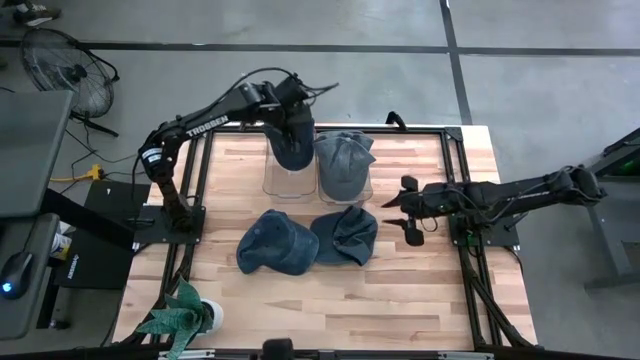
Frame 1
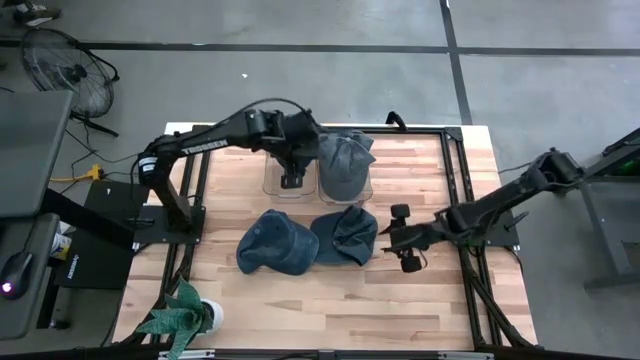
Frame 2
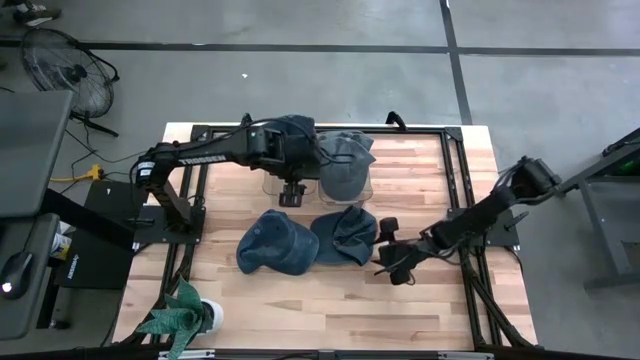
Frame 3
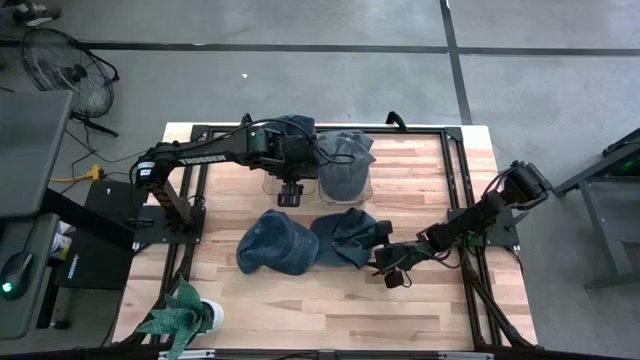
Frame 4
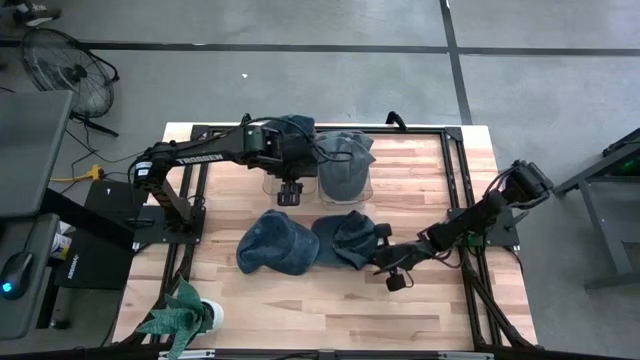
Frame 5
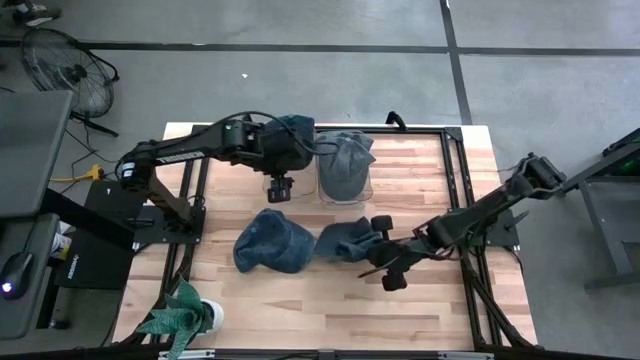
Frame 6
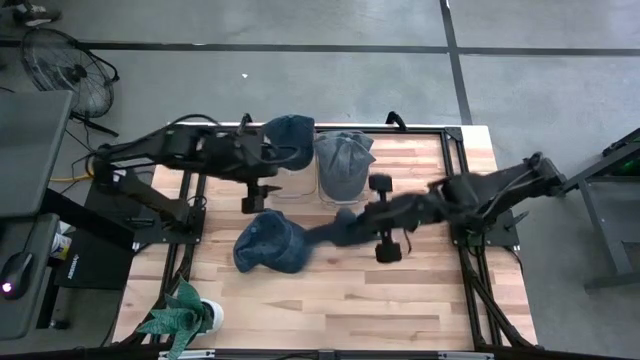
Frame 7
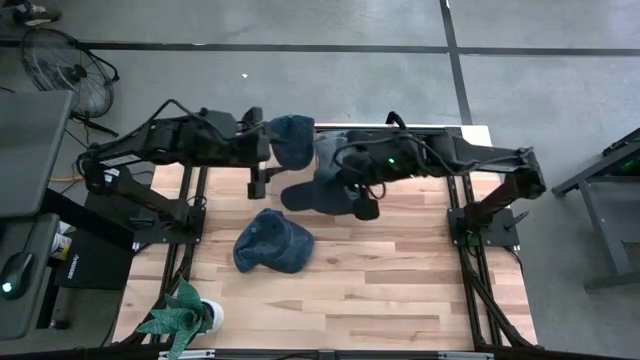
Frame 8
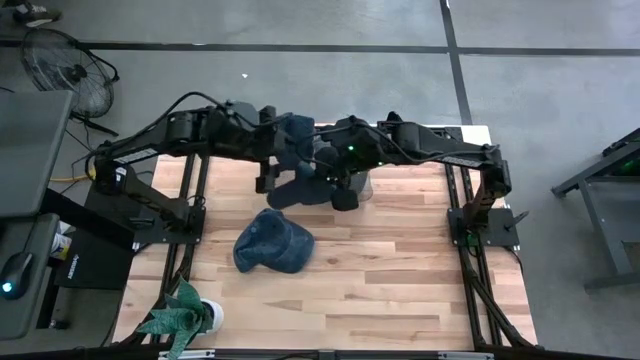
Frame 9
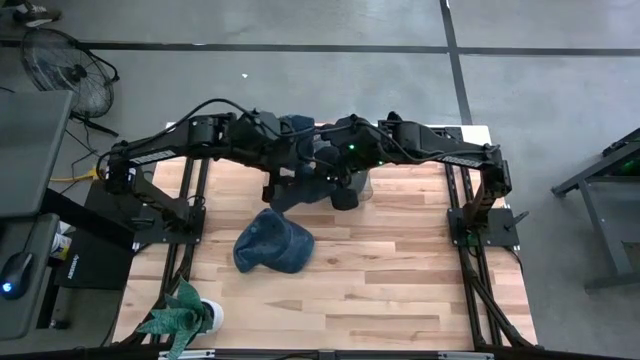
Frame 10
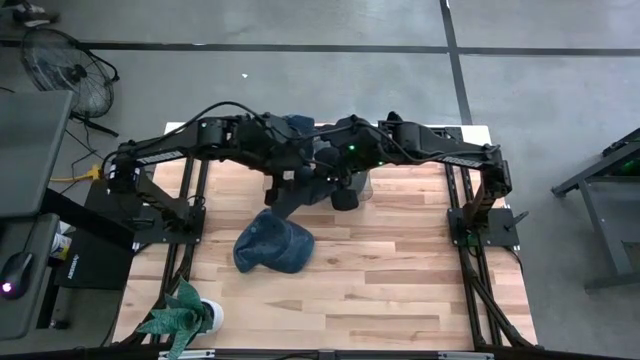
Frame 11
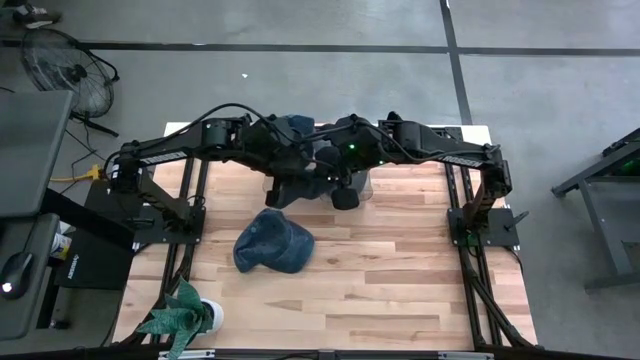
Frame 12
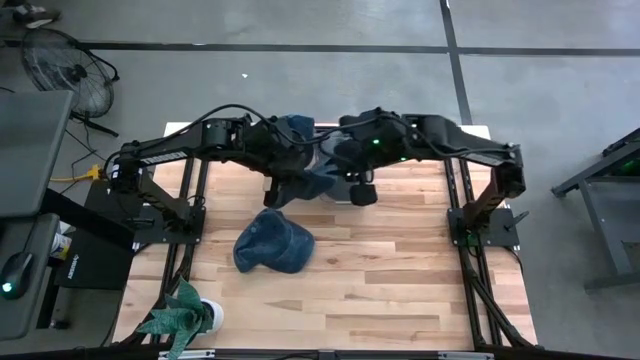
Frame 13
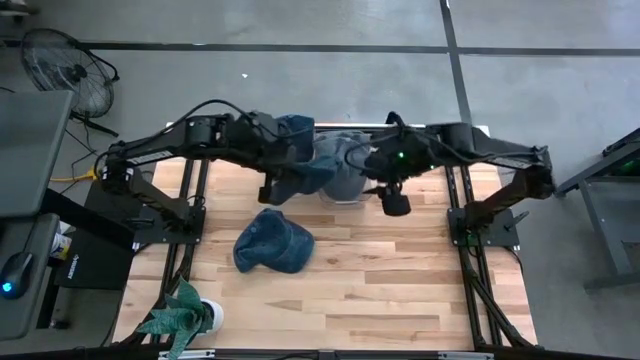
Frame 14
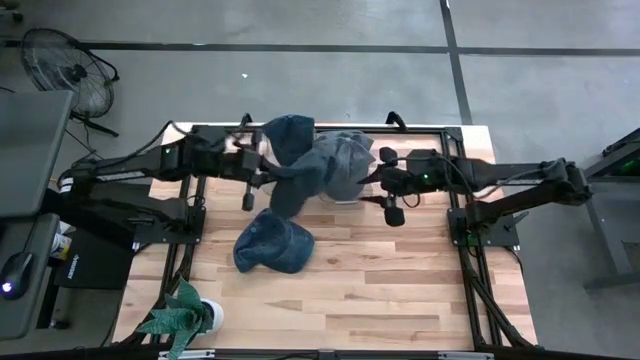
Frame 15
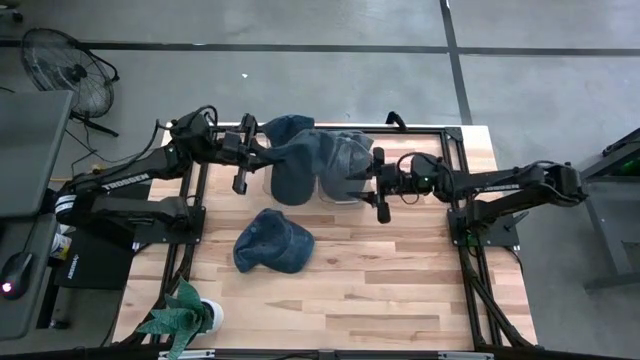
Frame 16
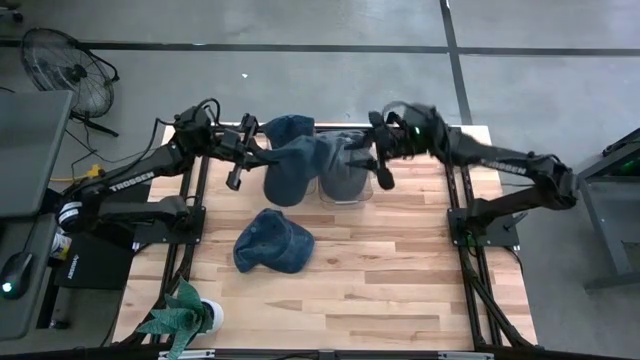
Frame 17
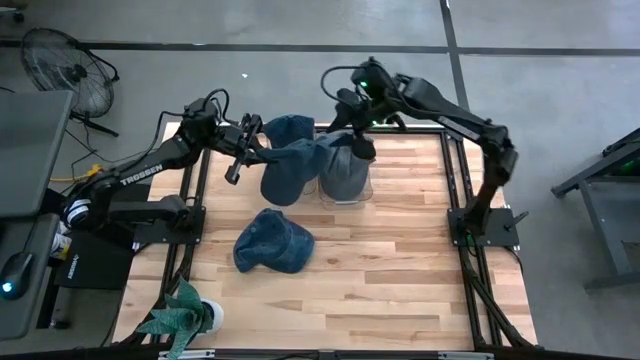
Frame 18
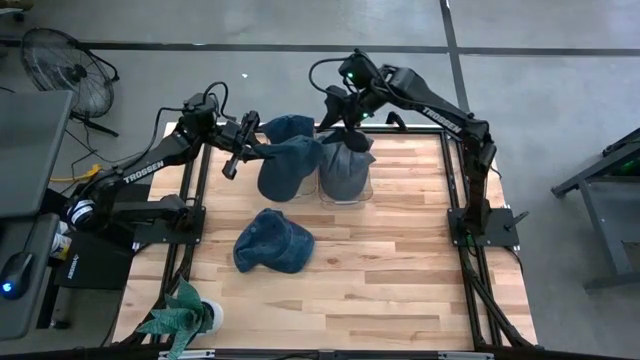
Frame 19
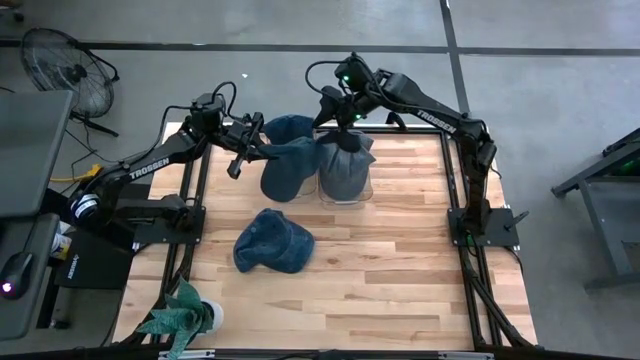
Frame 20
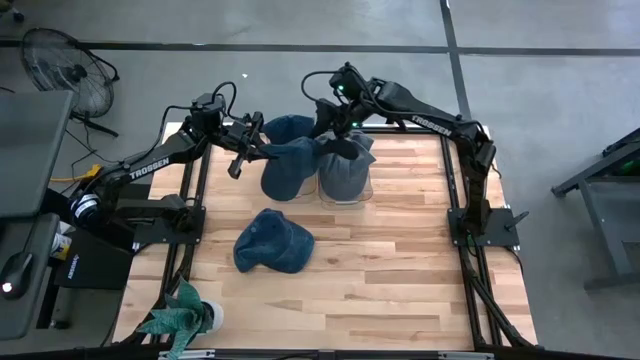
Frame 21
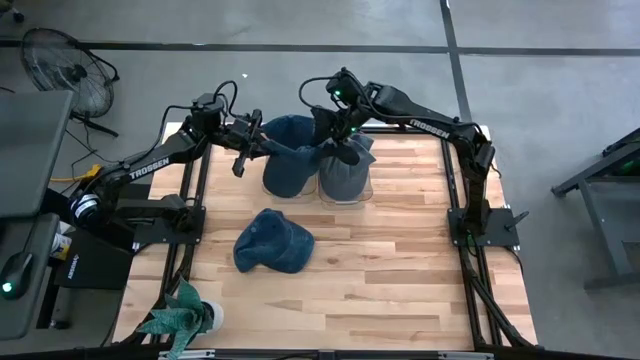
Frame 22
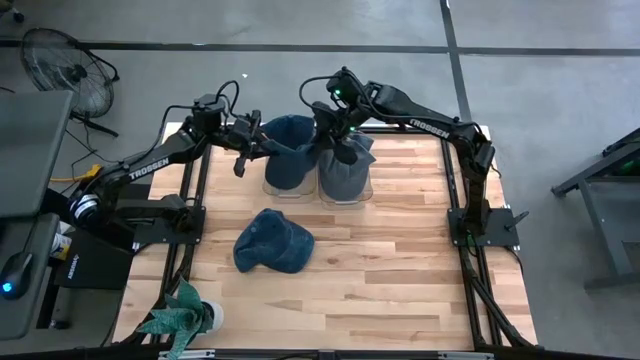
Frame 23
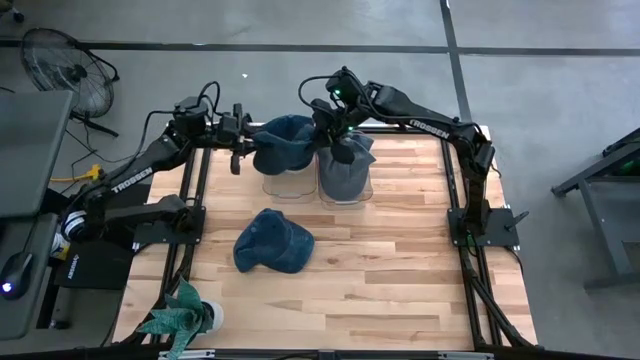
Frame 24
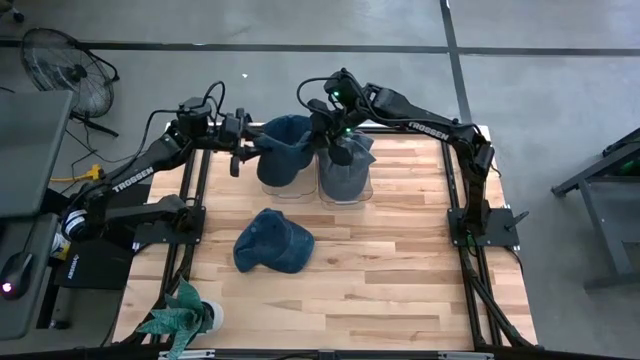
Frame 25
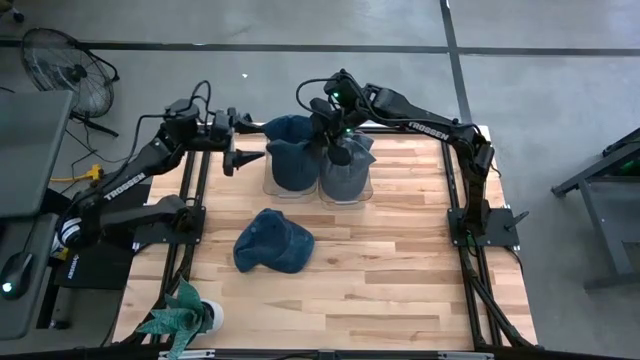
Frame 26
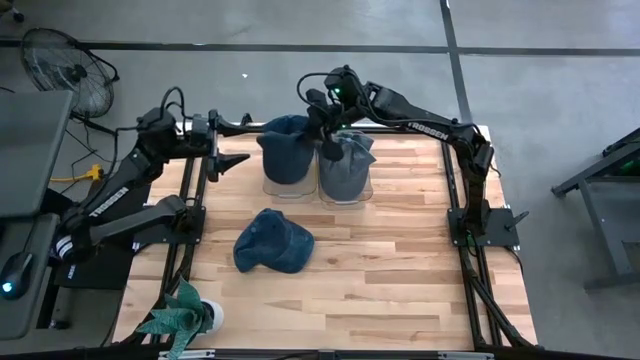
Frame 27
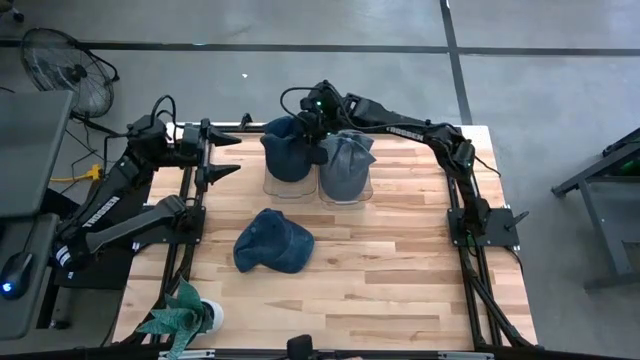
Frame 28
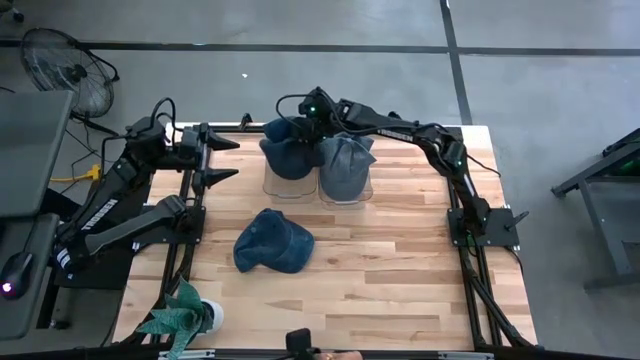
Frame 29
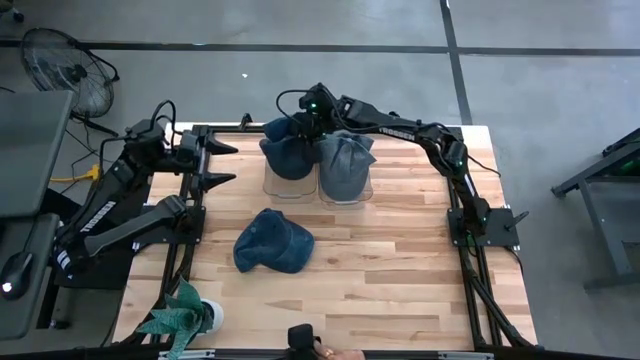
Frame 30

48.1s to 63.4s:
Task: Pick & Place hat
Put the right blue cap into the left transparent bin

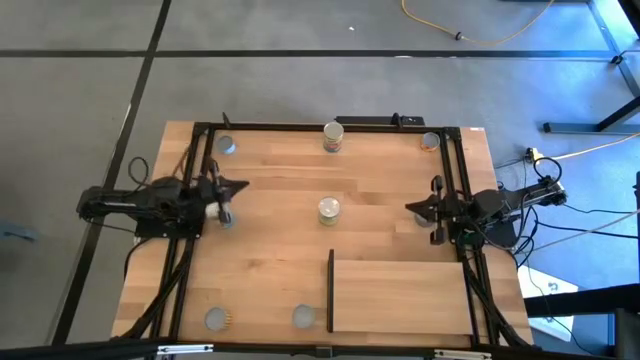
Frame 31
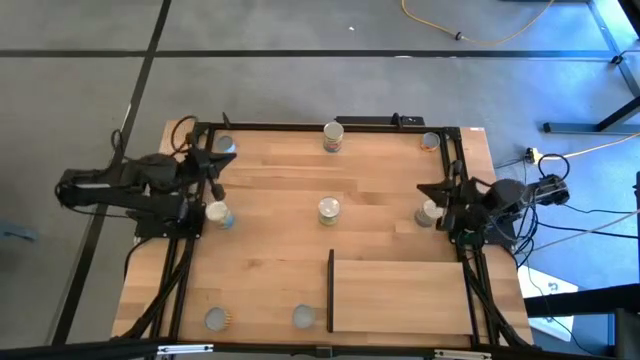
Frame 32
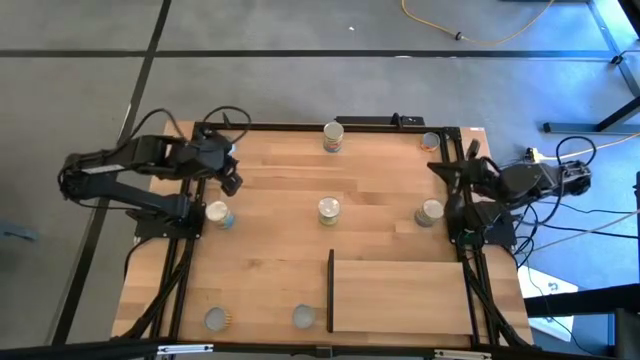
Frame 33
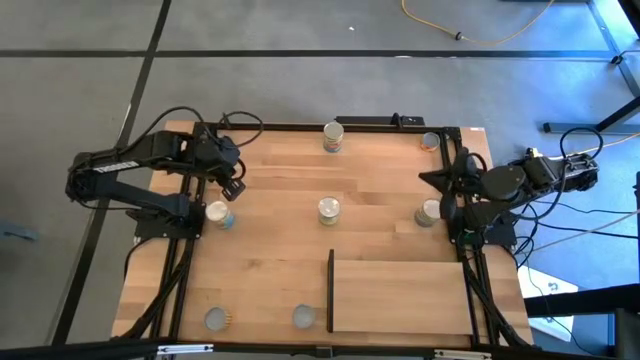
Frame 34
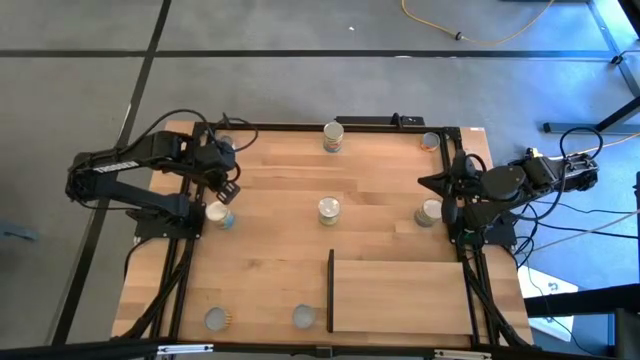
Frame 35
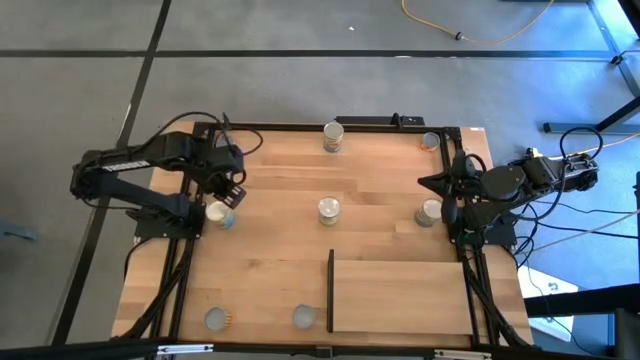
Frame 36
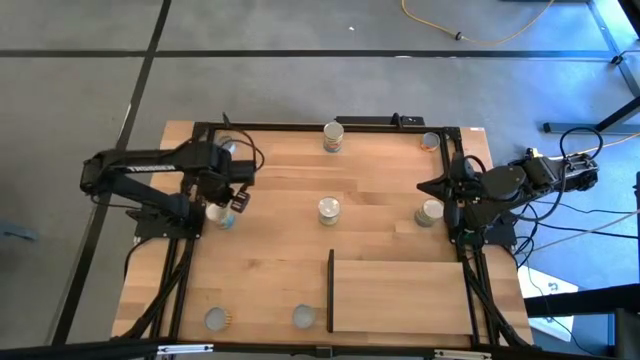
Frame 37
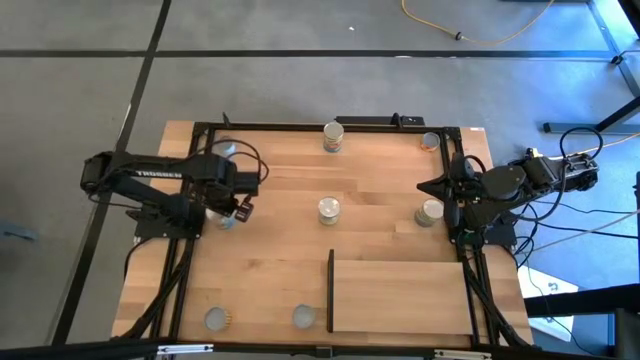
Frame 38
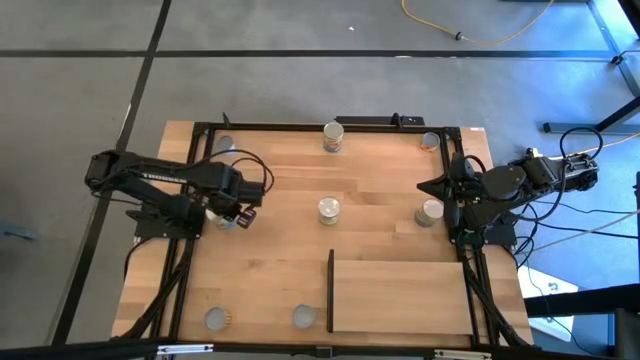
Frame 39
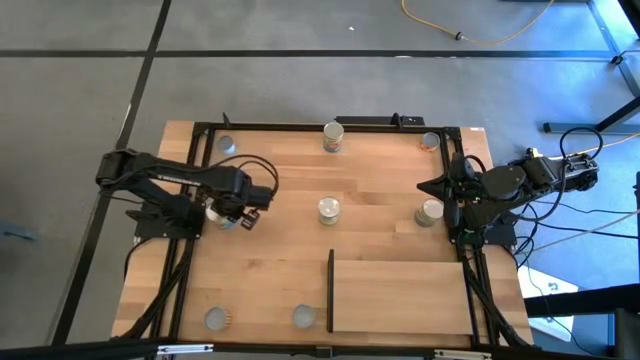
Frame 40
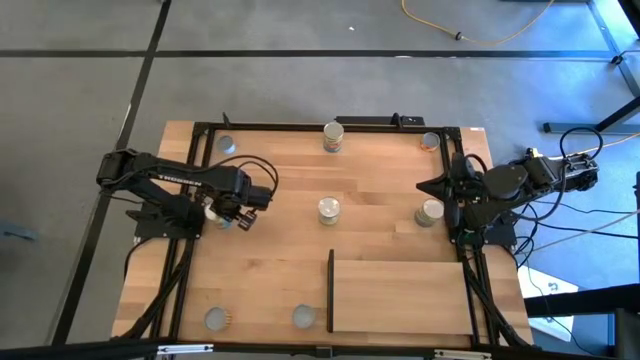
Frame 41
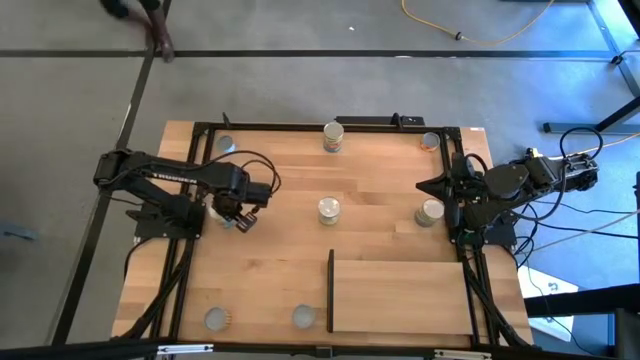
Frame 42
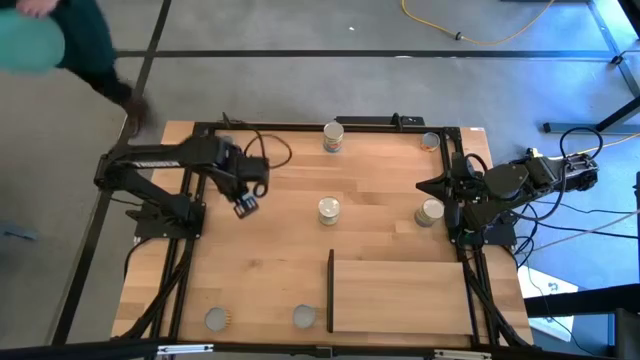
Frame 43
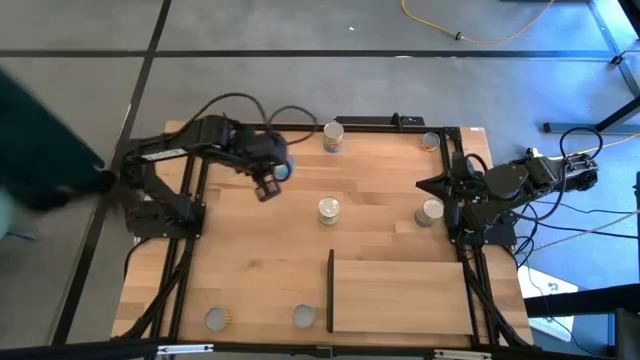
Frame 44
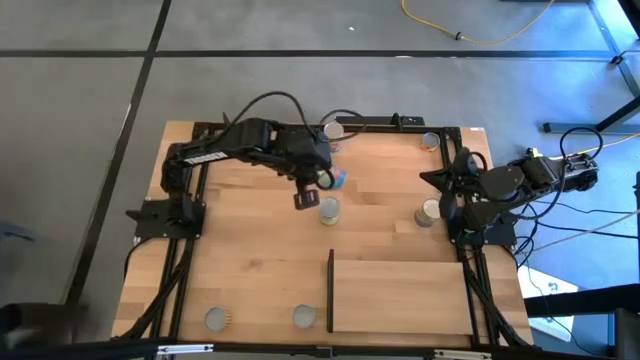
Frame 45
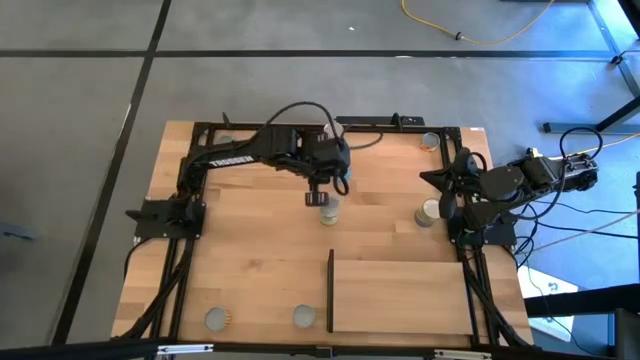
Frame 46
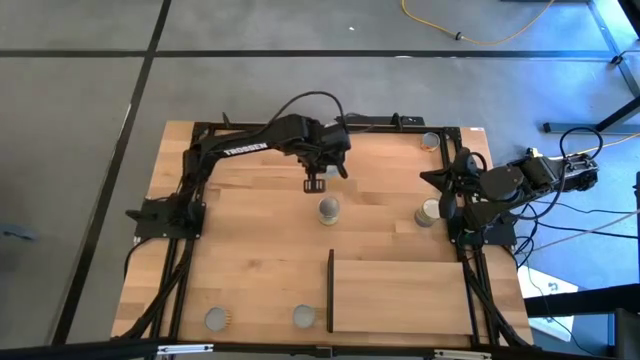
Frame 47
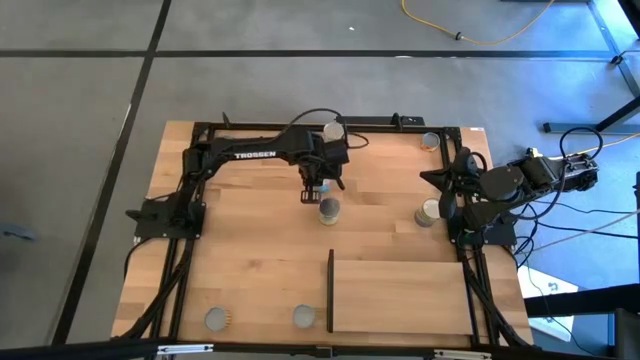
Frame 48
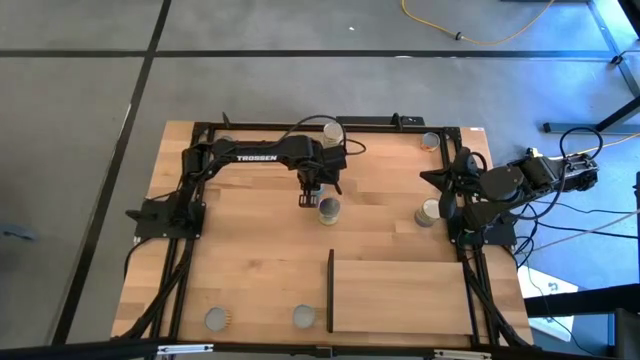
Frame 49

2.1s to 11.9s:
Task: Pick and place cans onto a shelf
Move the bottom canned tomatoes to the center of the table
